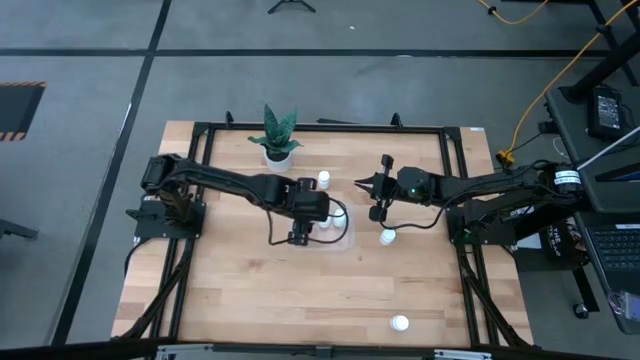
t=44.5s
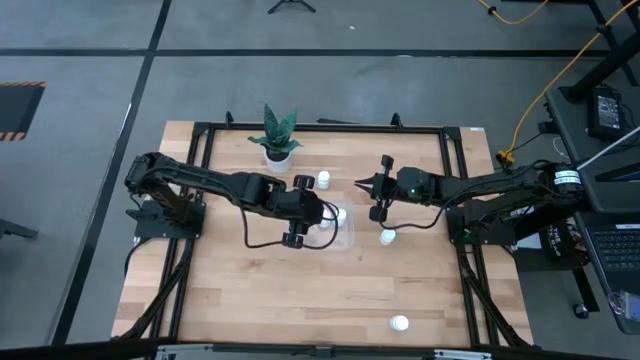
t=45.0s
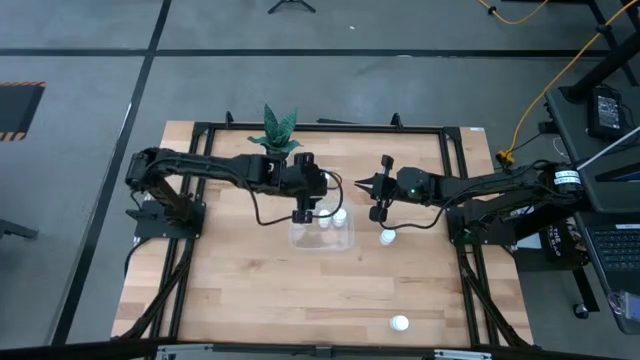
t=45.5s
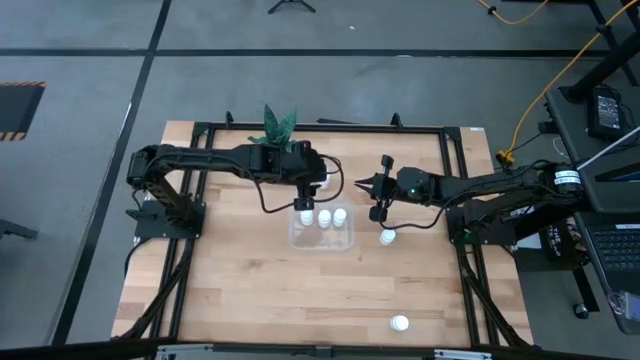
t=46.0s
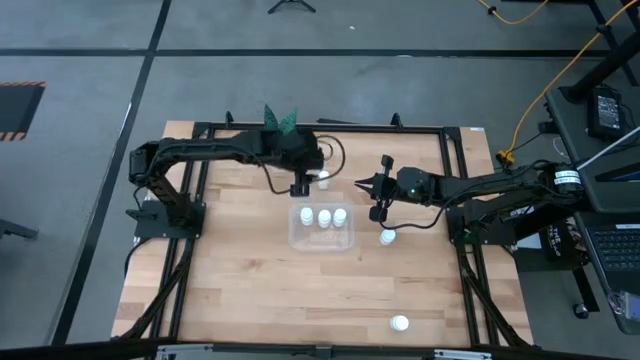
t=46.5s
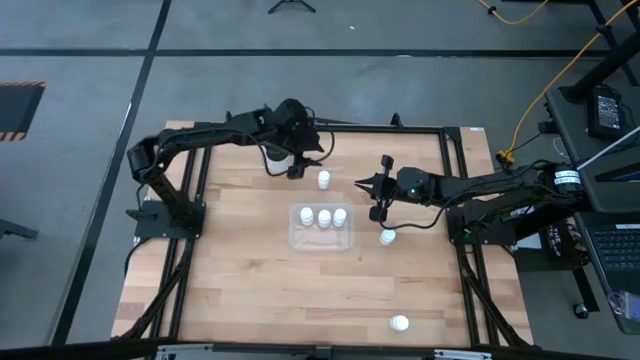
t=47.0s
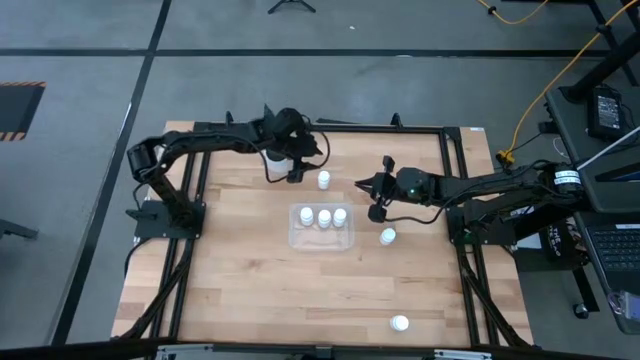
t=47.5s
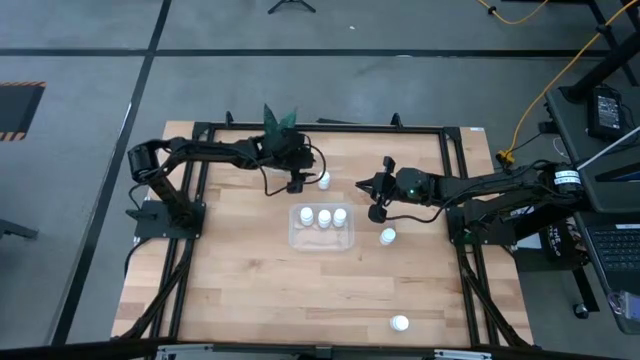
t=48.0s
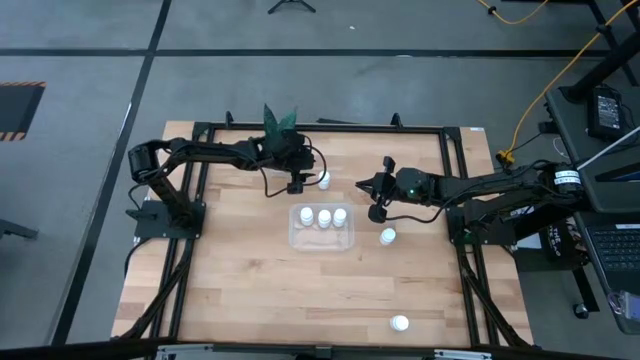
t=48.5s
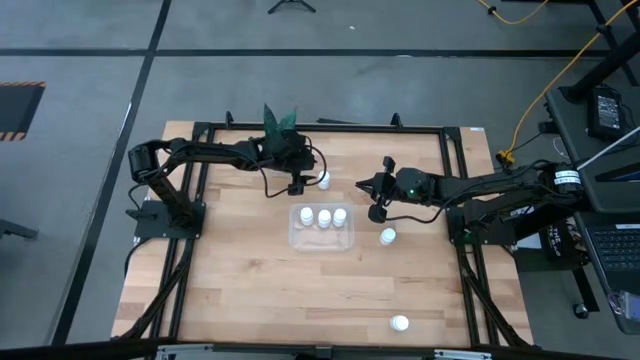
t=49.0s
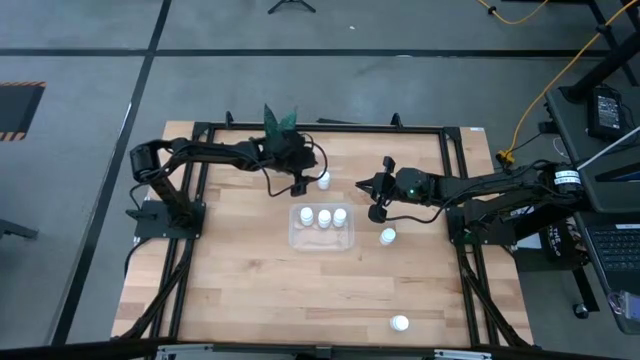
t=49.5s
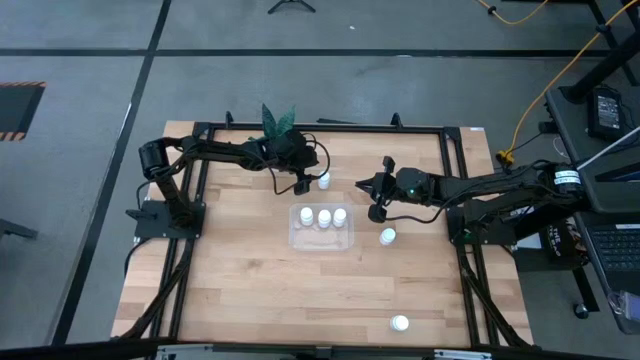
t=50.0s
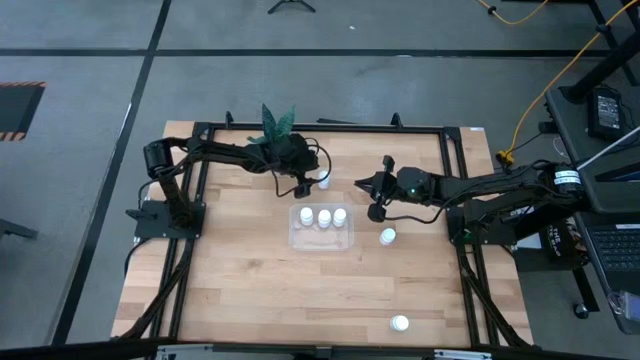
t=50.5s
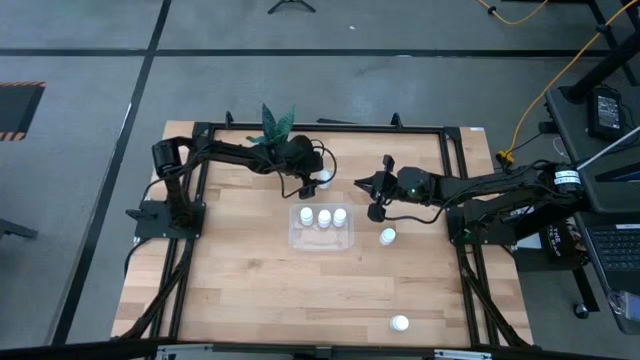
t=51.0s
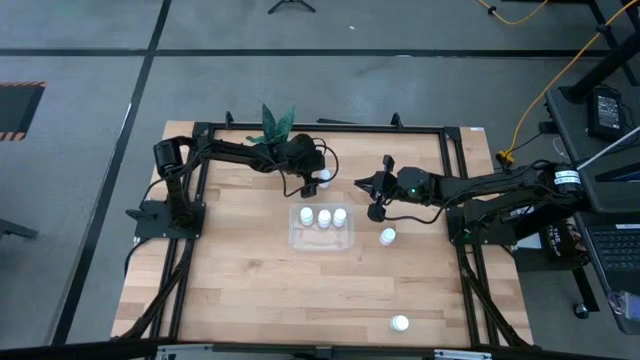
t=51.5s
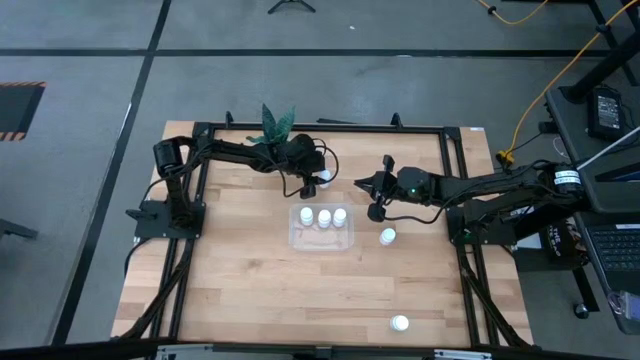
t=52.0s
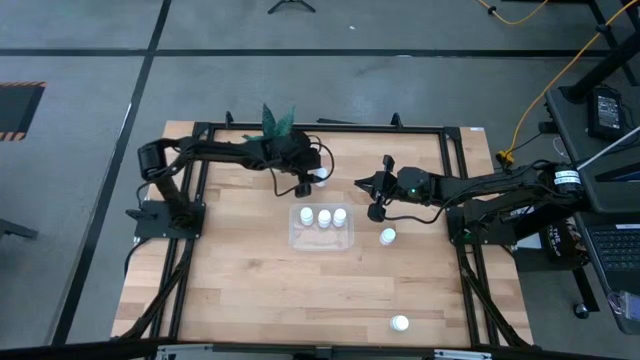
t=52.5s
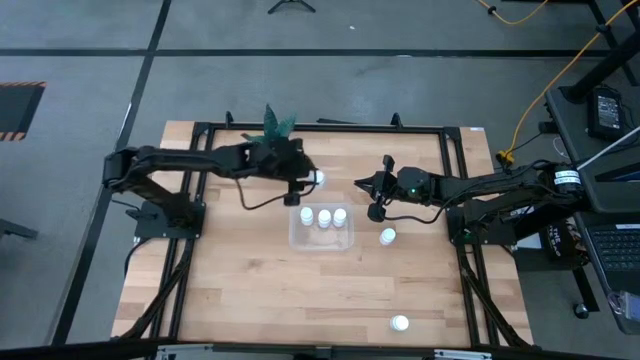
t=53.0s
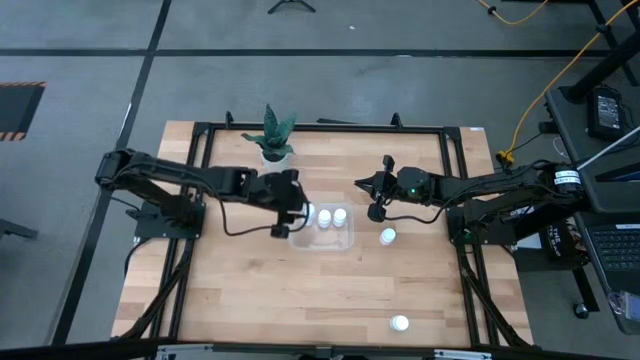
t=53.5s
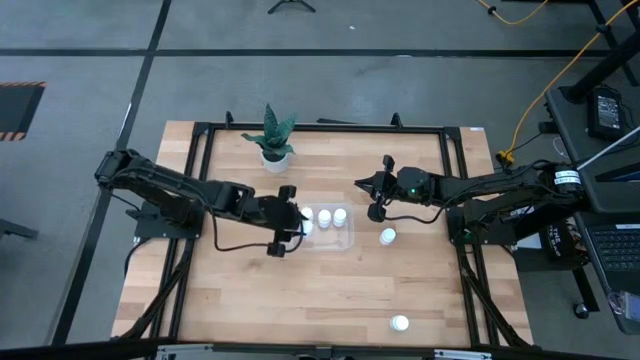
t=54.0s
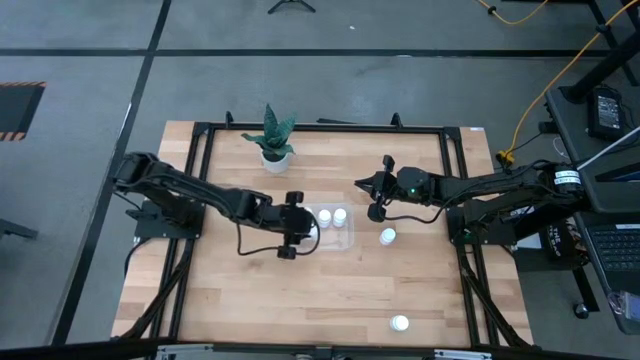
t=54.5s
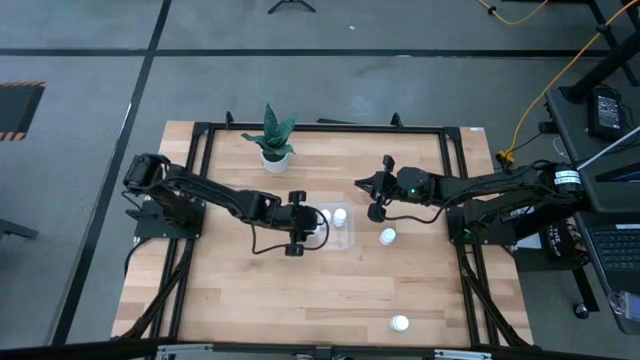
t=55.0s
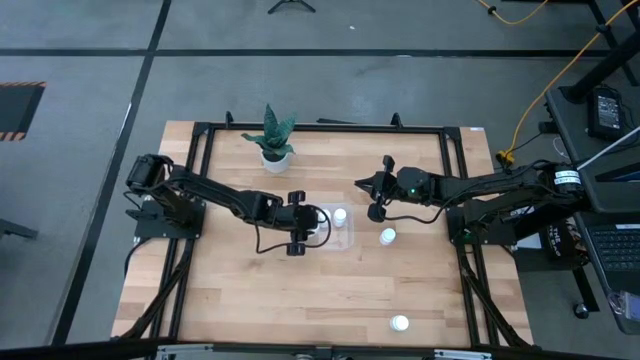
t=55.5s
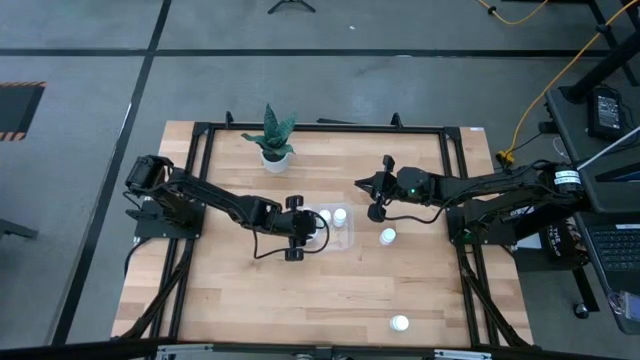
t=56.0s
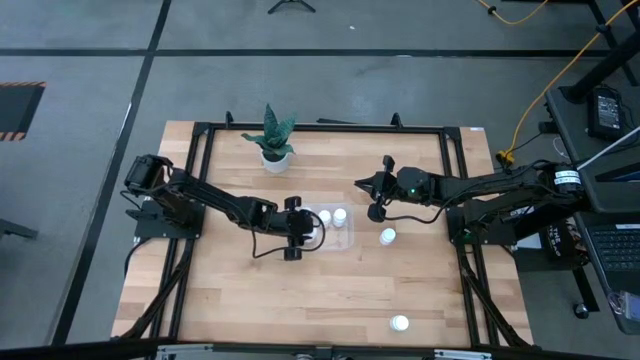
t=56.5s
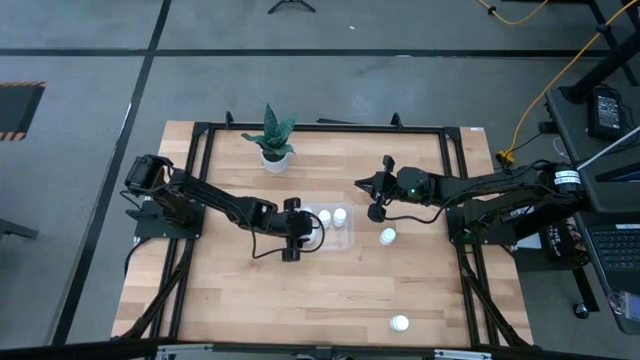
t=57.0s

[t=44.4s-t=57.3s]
Task: Pick and place pill bottles into a basket
Put the white medicine bottle into the transparent bin

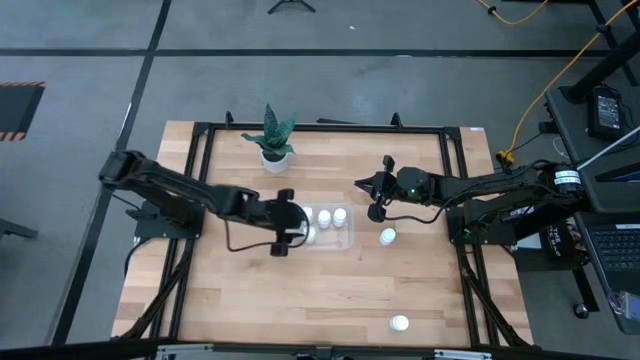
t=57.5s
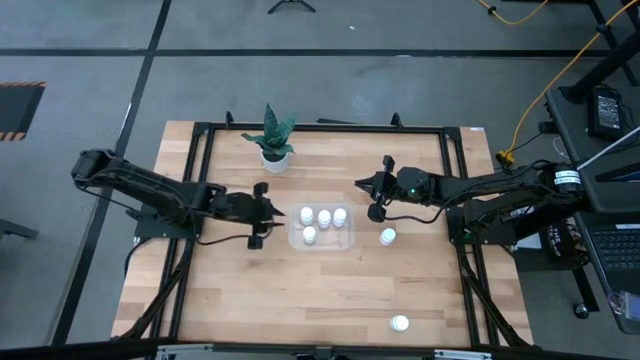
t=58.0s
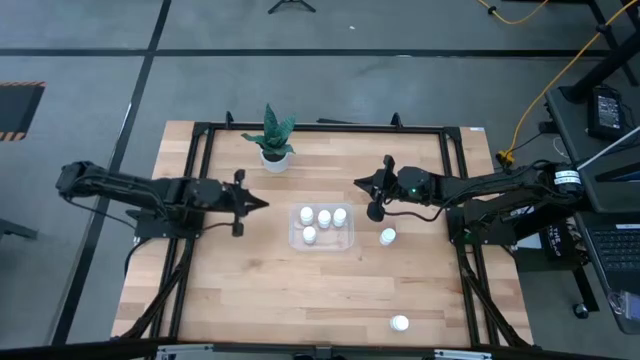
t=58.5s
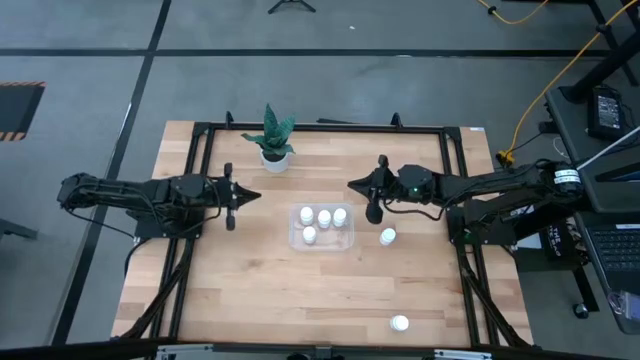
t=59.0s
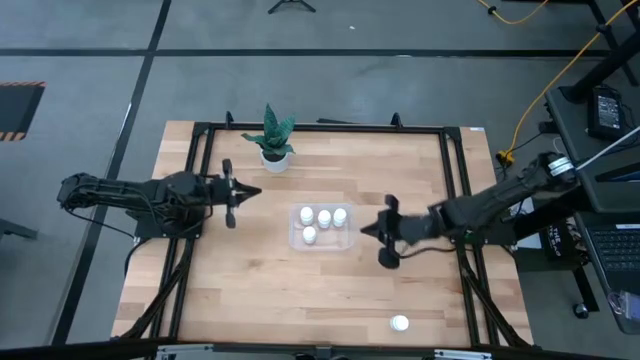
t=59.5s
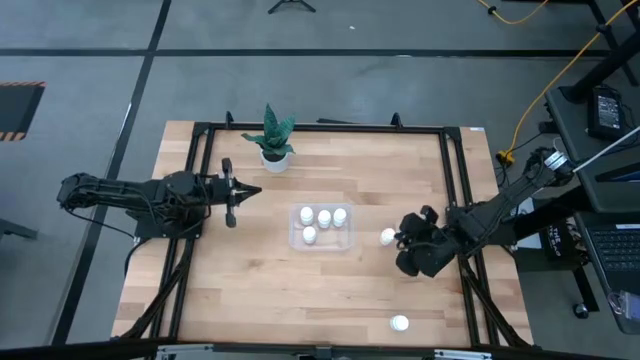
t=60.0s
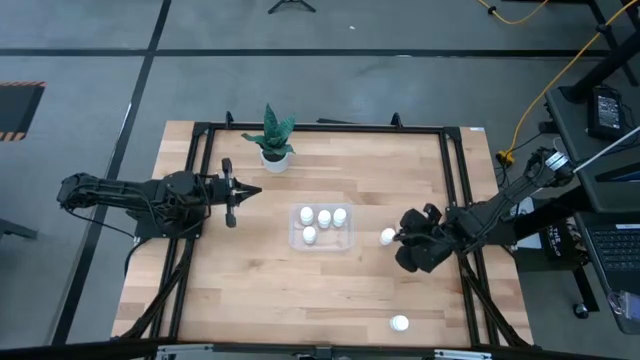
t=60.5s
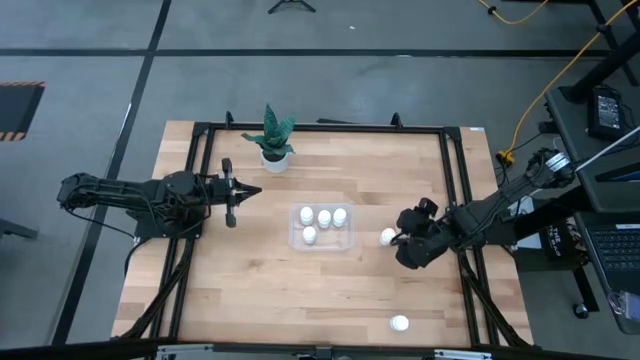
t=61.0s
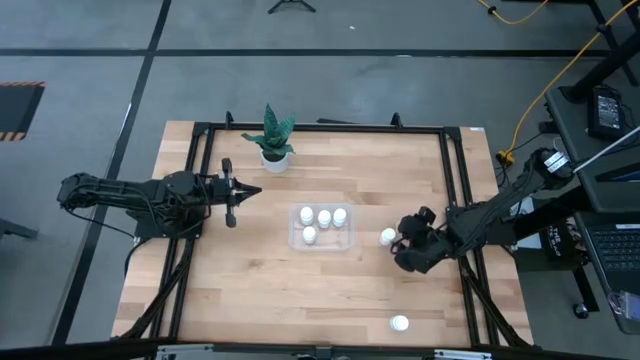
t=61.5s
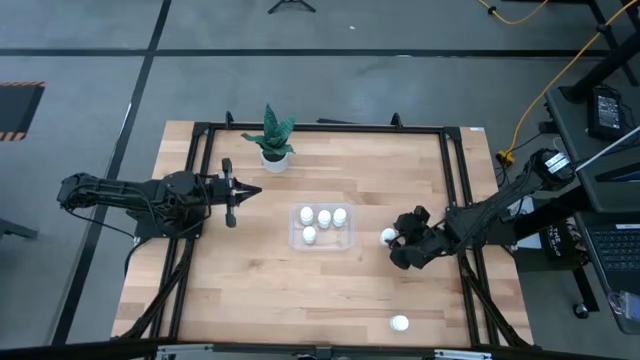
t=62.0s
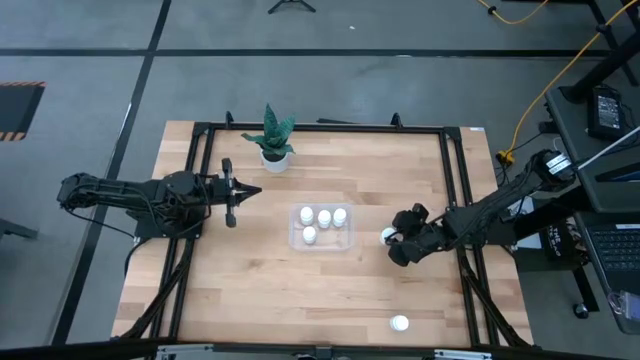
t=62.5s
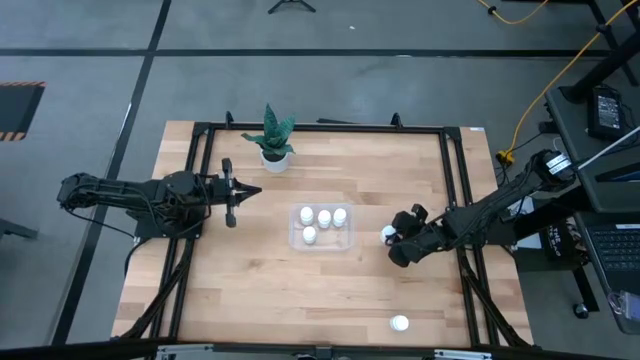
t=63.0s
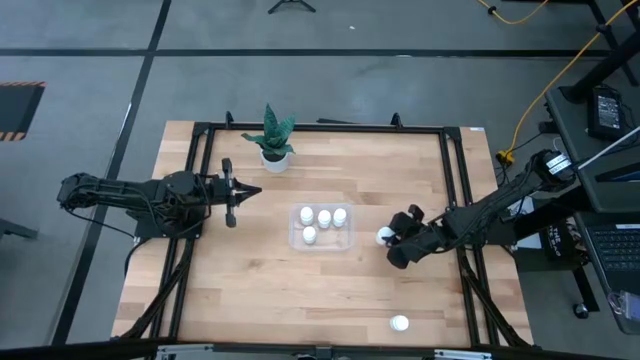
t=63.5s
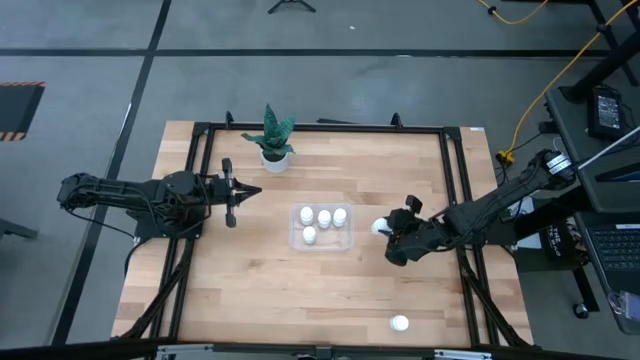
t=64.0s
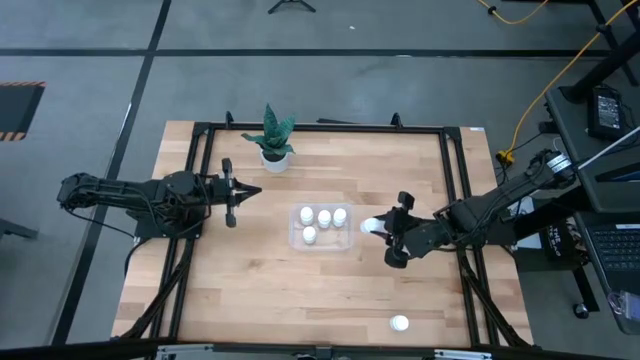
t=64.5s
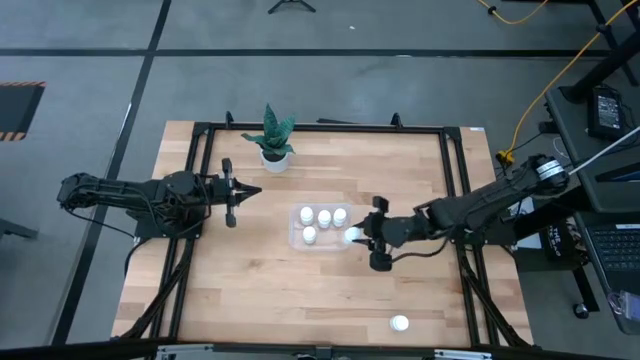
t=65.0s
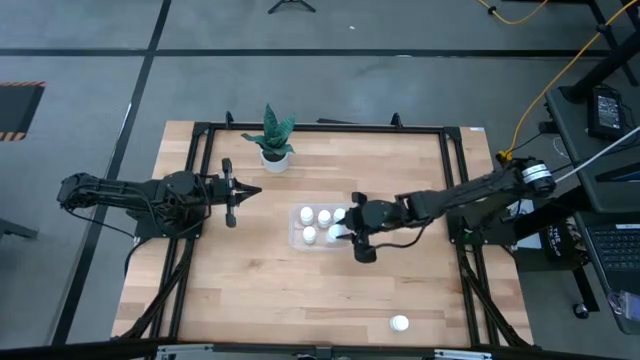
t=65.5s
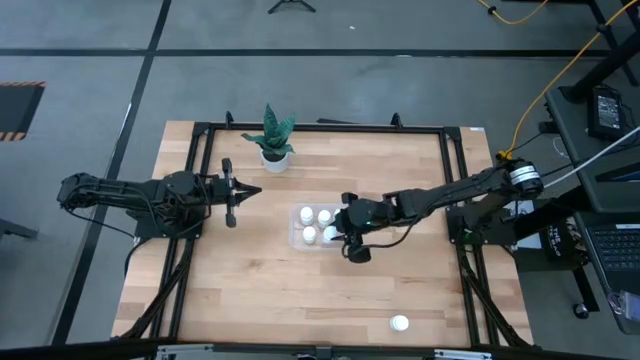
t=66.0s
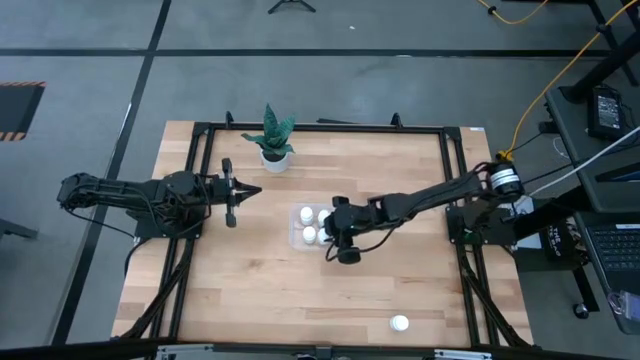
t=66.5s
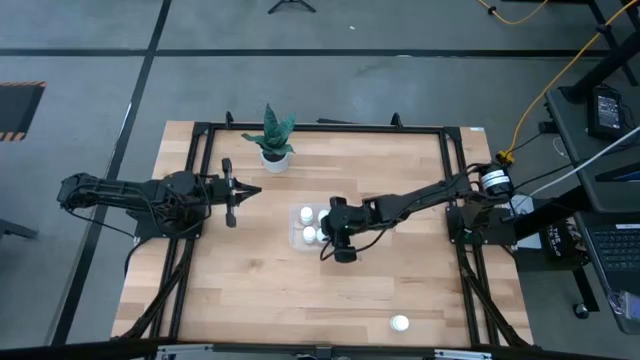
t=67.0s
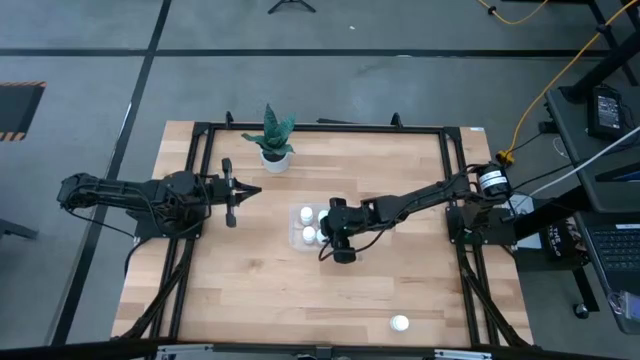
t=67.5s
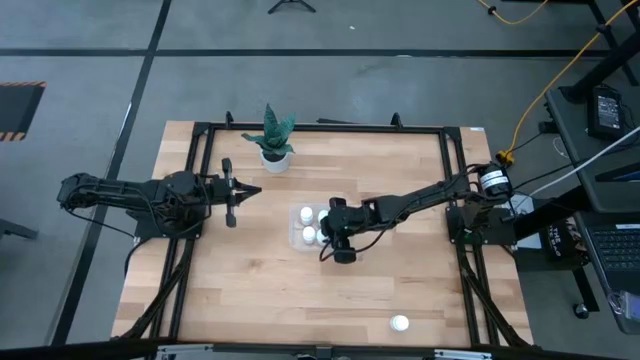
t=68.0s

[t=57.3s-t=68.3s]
Put the white medicine bottle into the transparent bin
